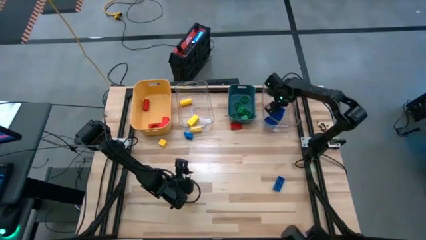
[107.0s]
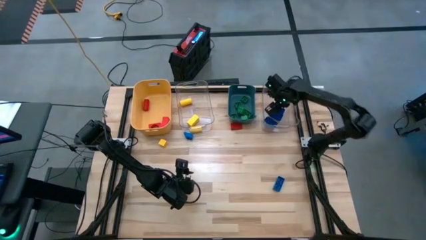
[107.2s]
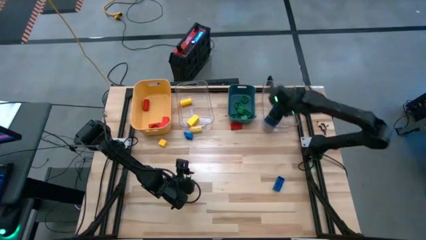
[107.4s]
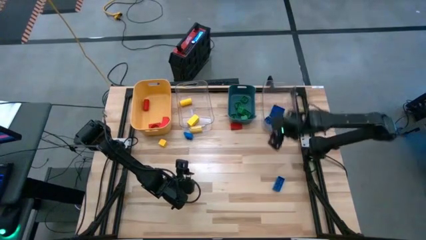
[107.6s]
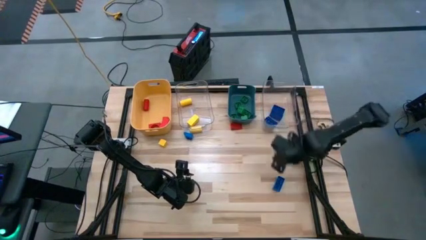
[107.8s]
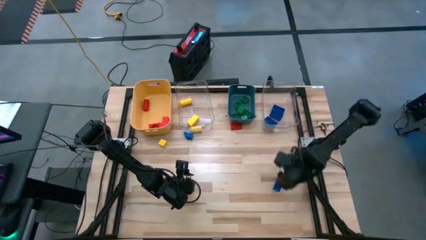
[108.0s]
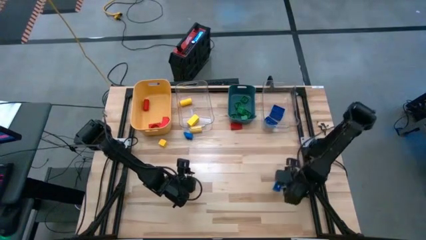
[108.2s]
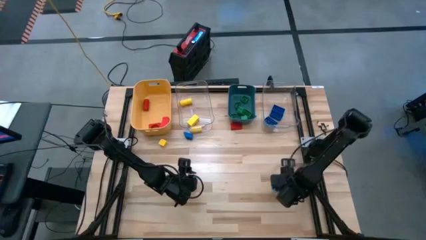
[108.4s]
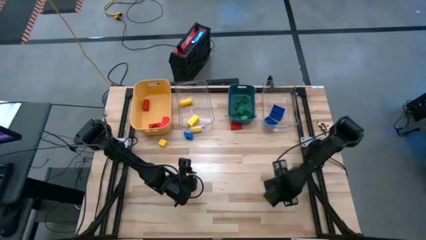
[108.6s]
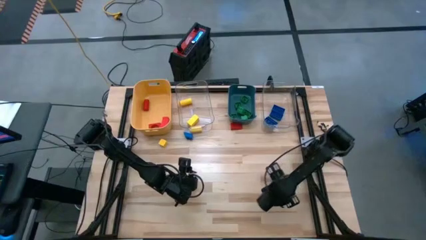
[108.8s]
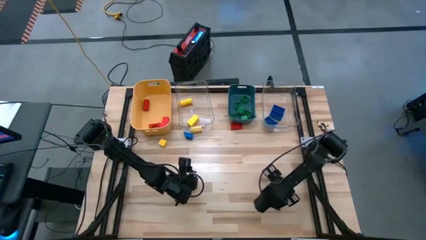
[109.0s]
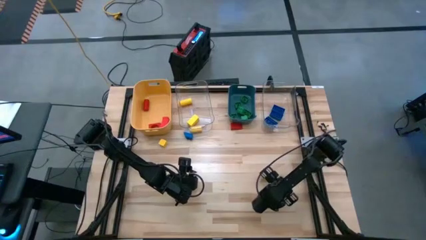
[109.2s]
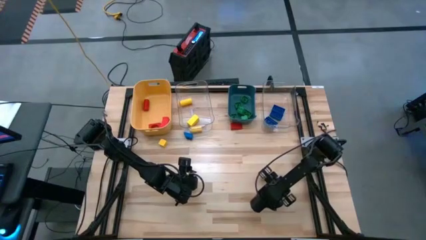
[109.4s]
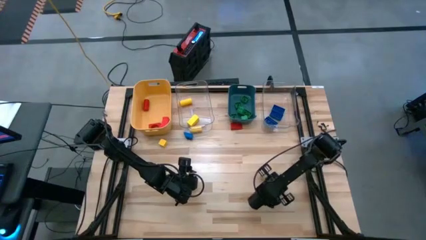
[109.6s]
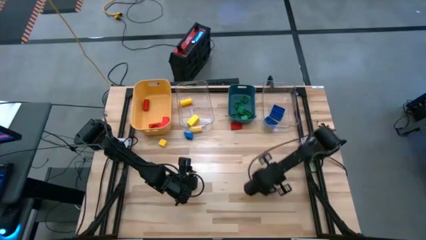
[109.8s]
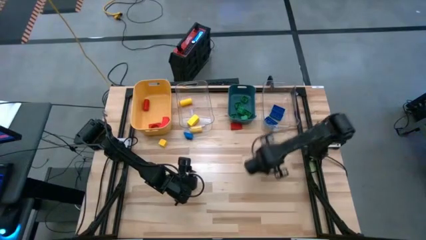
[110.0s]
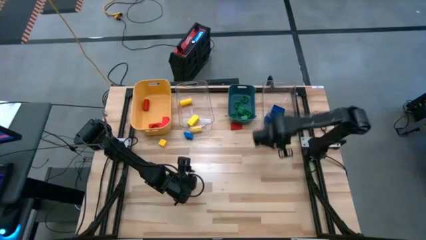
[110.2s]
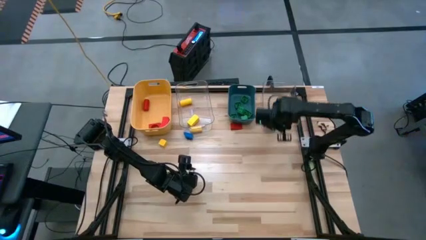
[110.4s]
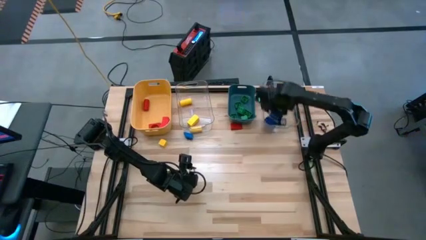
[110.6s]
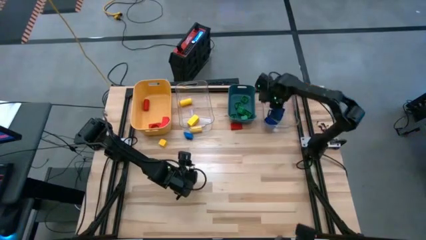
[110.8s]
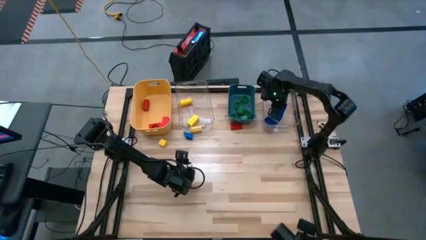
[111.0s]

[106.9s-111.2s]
Task: Sort blocks
Put the blue game piece into the right transparent bin

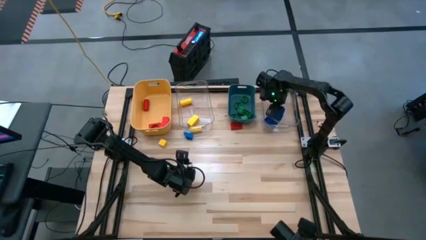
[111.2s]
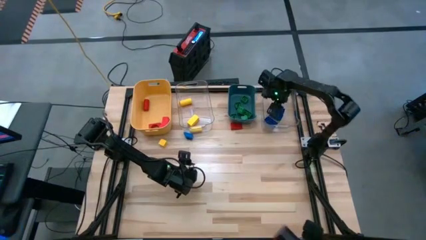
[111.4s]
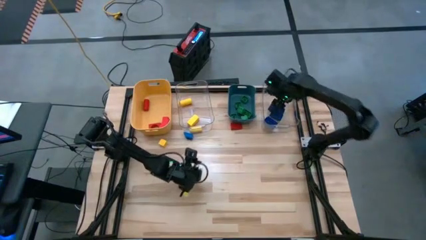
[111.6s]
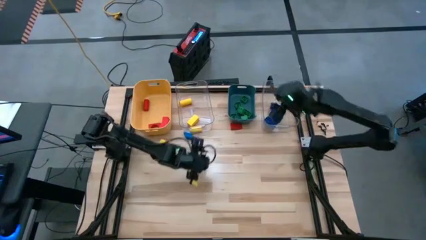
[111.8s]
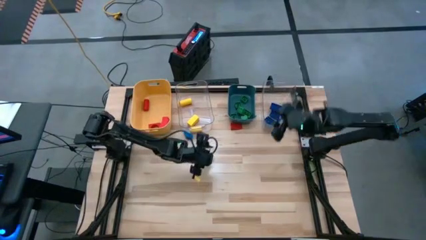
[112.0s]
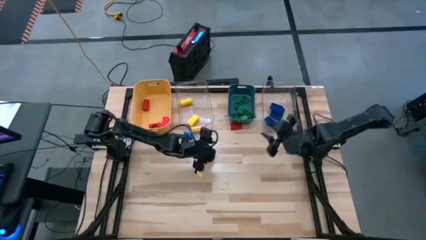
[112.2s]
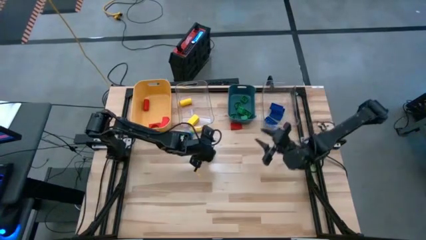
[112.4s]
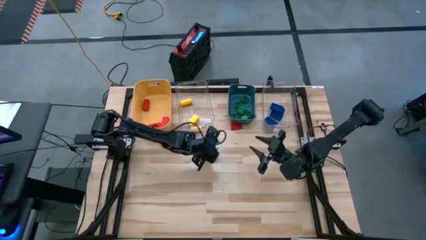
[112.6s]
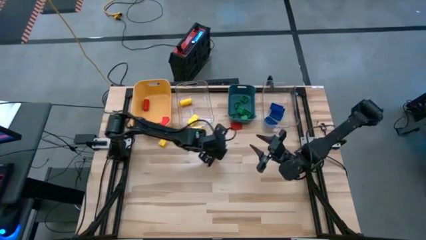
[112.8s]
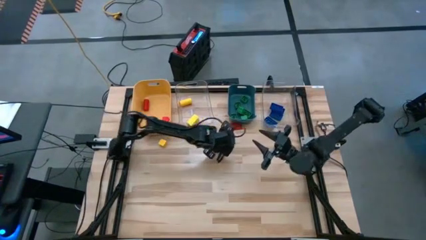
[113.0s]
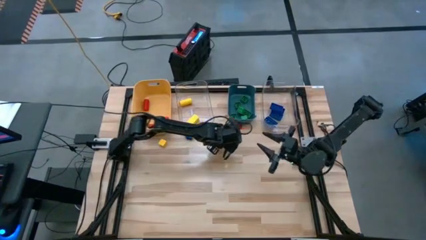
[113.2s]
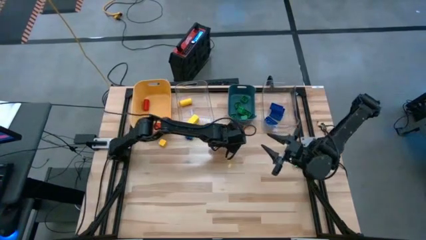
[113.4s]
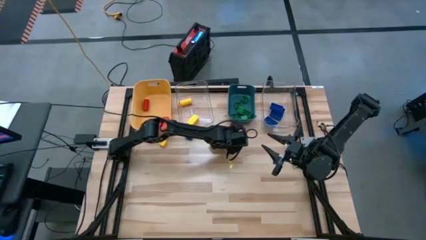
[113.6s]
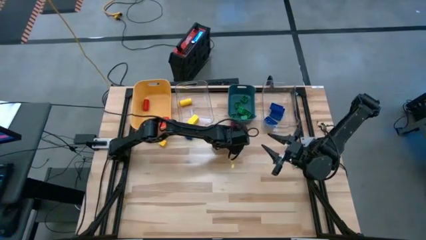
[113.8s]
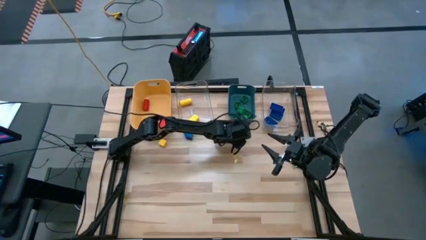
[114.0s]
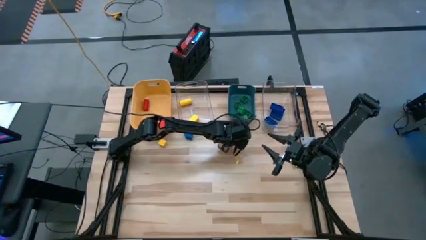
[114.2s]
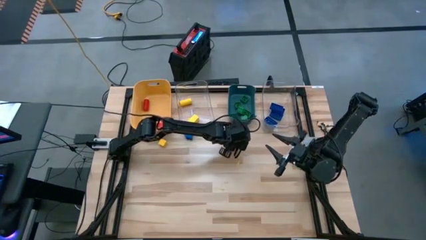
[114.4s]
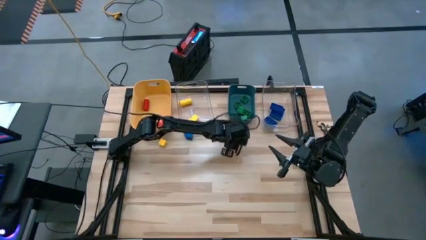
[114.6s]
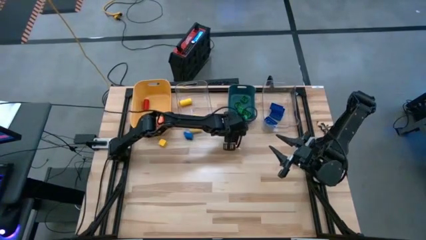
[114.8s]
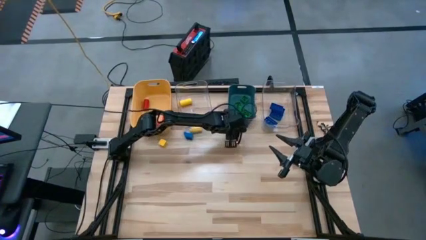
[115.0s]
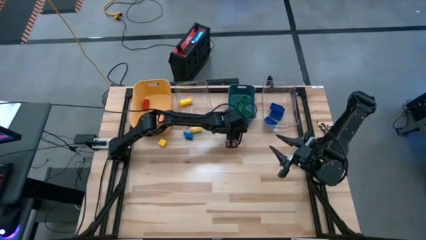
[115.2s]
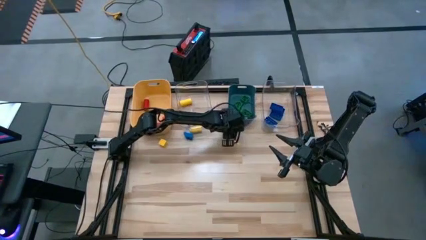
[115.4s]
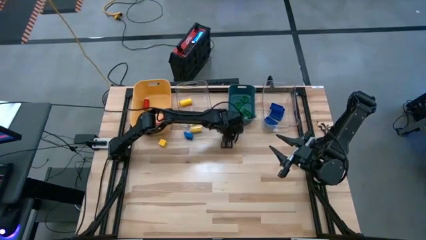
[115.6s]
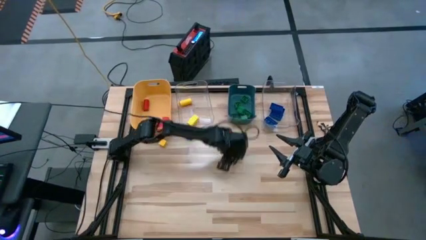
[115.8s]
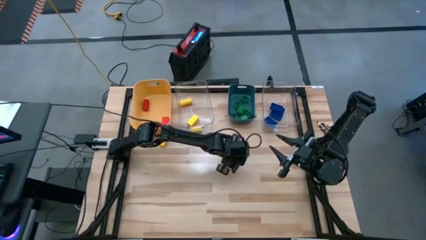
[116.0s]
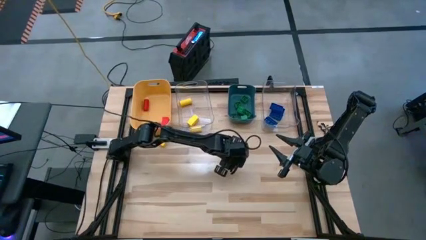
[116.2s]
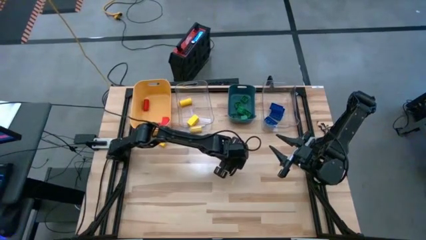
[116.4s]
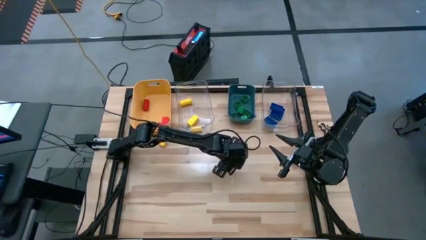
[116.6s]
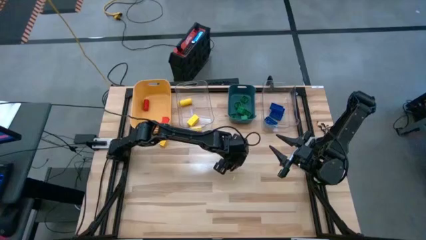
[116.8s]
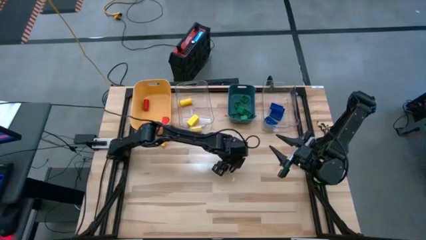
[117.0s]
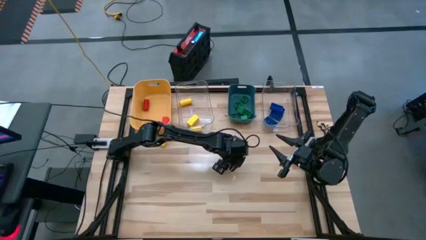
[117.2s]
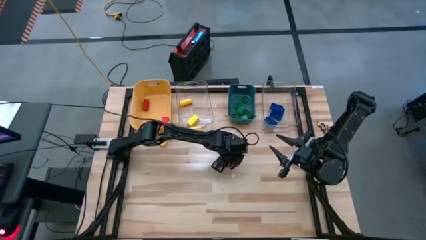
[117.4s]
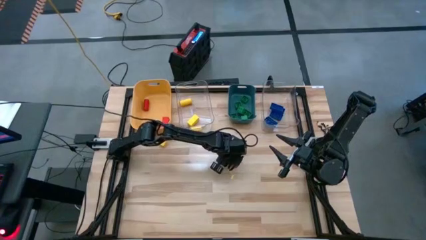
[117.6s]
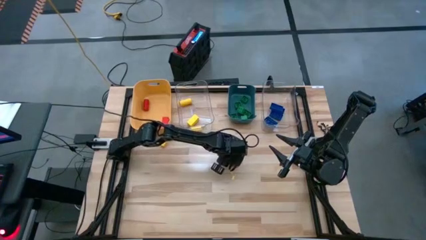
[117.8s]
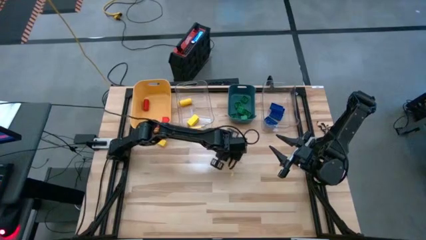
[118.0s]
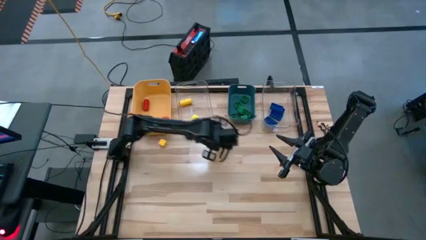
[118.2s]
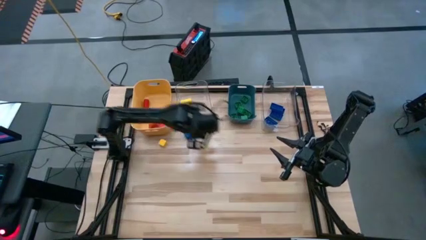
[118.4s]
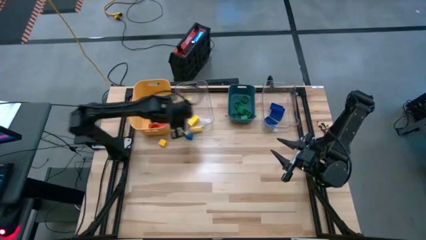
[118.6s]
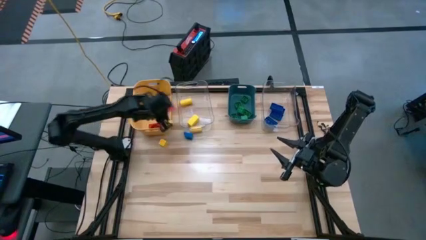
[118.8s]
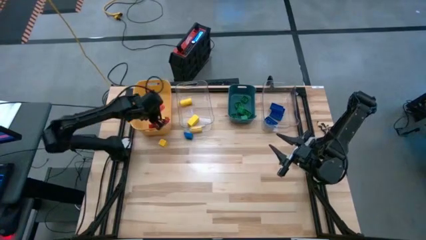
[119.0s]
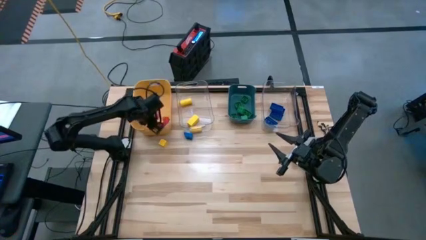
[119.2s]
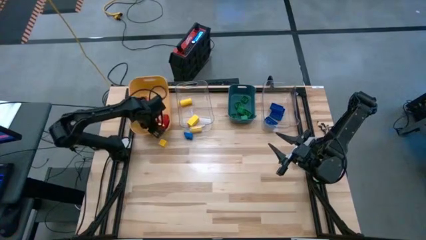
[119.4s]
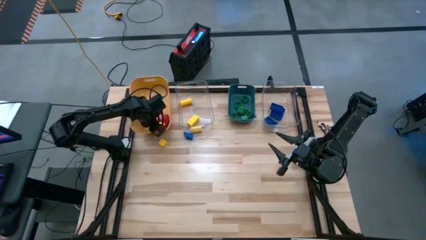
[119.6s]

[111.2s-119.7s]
Put the red block into the yellow bin

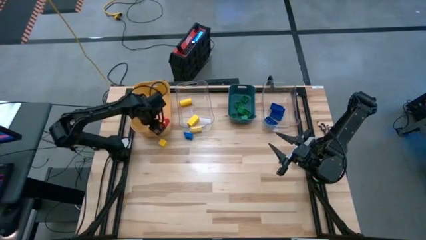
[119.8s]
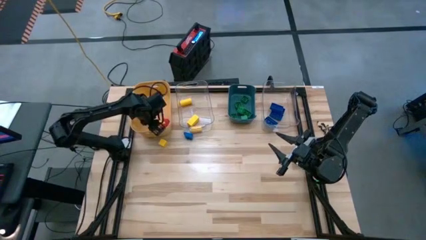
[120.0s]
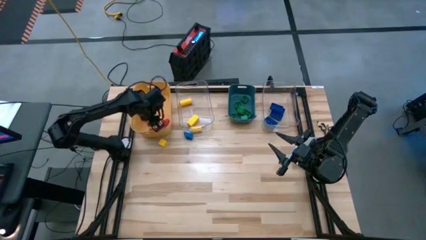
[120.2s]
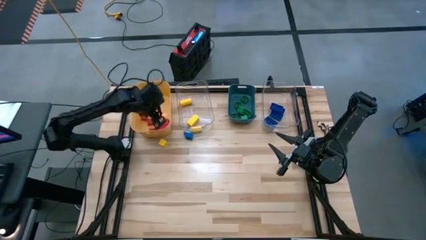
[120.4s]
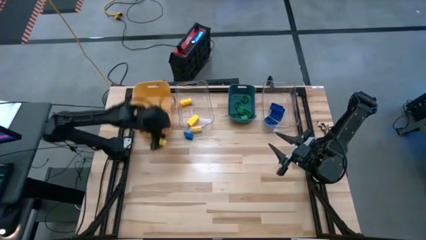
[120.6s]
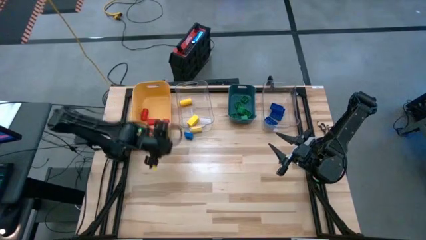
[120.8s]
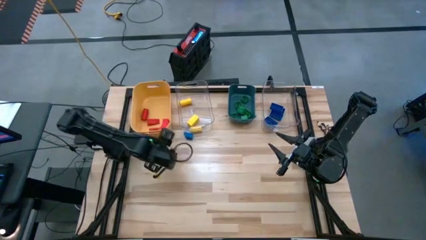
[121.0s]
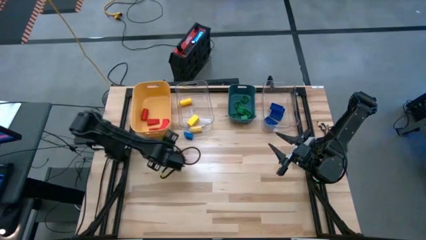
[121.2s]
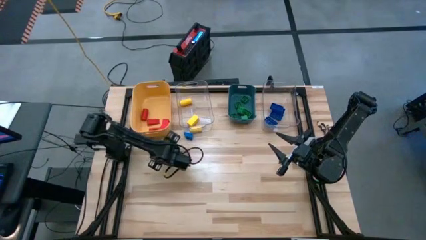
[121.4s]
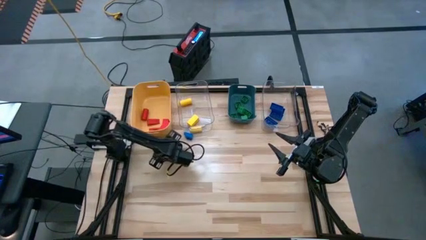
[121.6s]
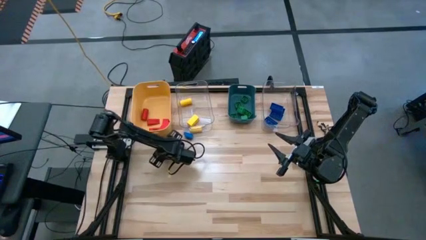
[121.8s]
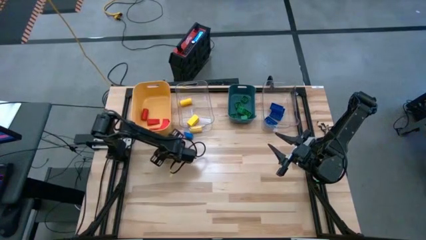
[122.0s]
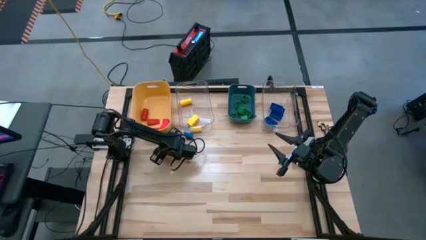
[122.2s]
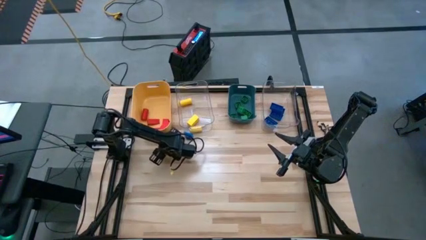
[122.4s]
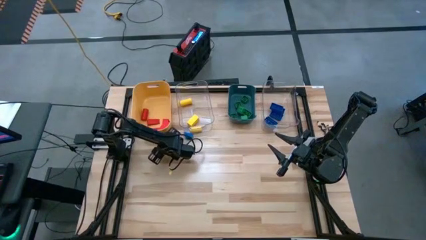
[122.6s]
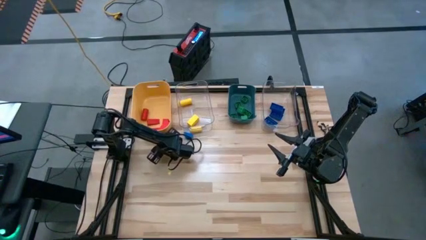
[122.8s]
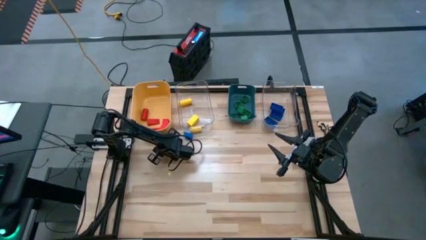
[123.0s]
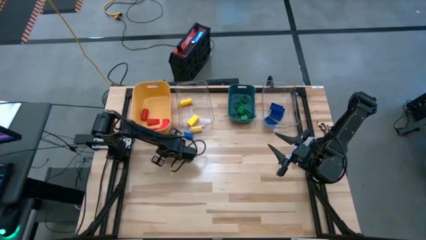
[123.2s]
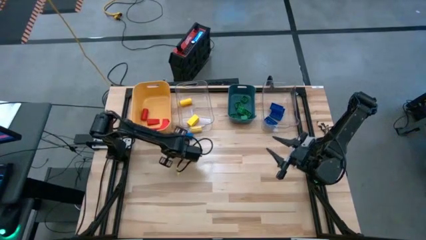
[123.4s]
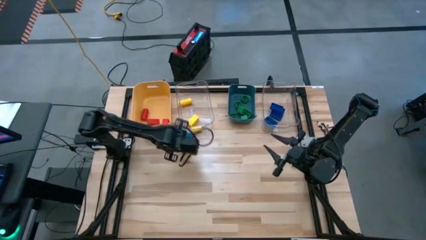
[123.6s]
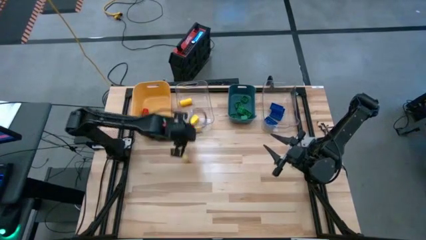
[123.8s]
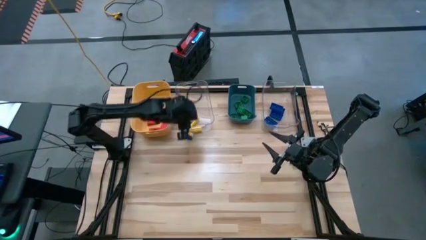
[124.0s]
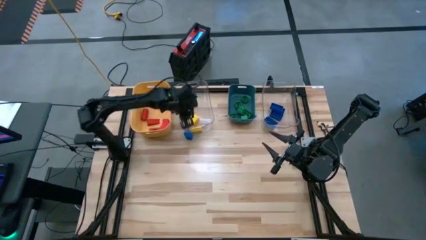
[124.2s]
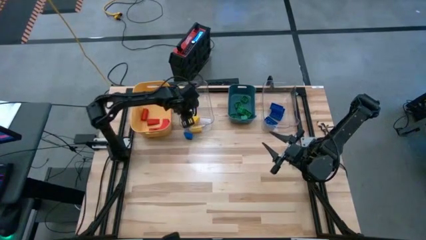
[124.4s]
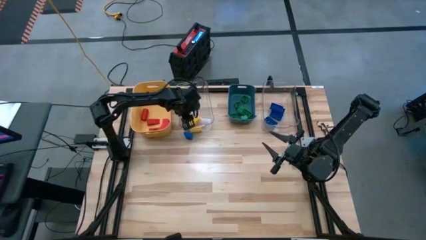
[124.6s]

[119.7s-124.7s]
Put the yellow block into the left transparent bin
